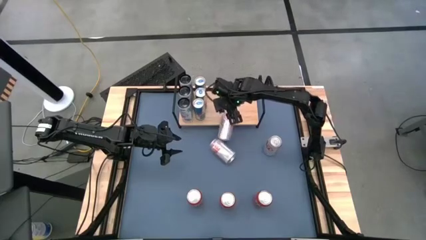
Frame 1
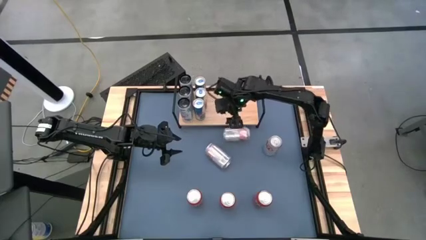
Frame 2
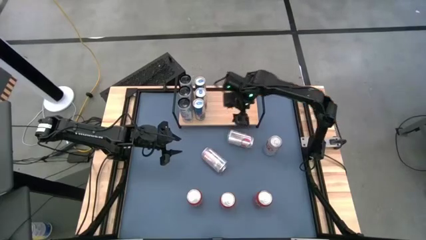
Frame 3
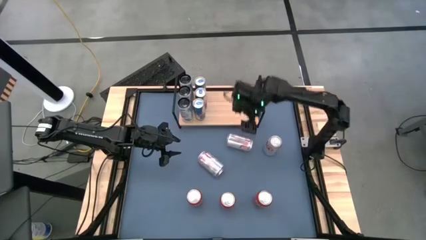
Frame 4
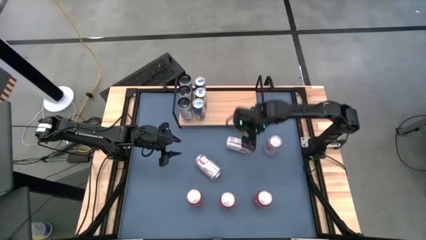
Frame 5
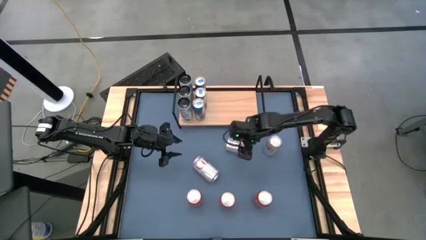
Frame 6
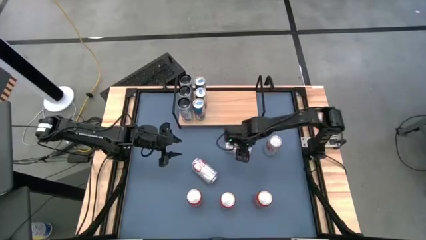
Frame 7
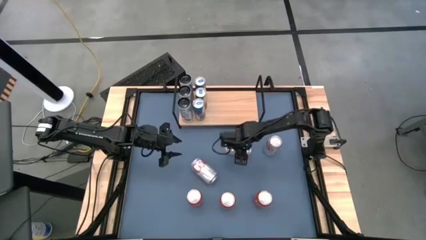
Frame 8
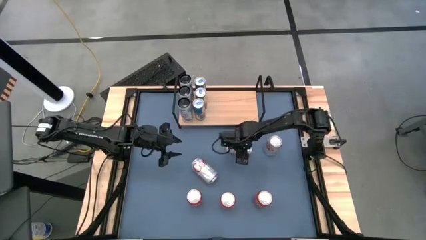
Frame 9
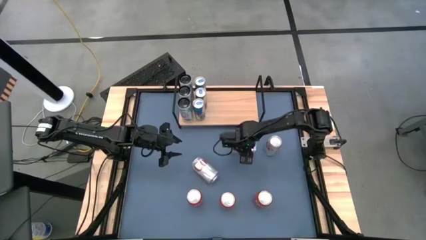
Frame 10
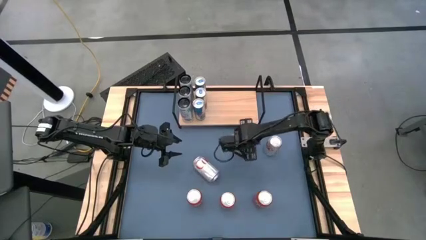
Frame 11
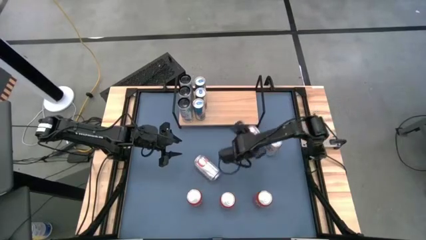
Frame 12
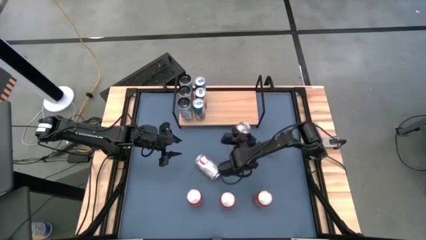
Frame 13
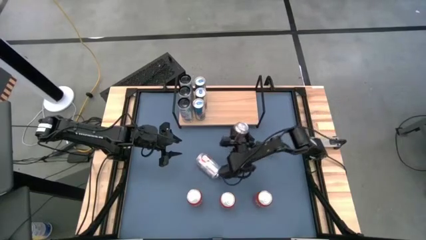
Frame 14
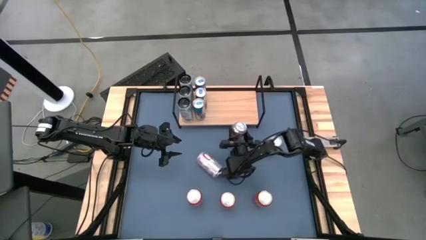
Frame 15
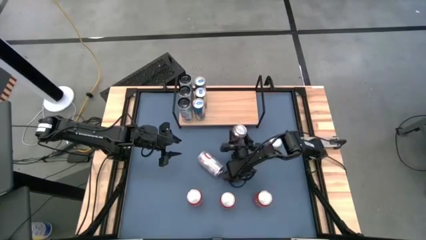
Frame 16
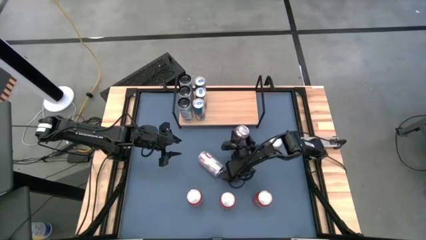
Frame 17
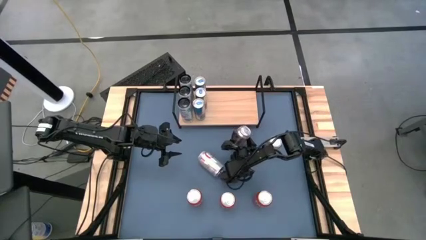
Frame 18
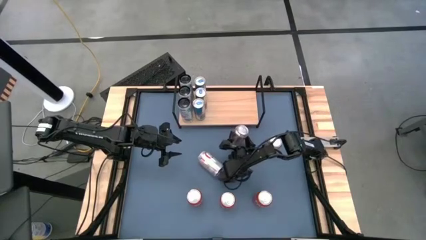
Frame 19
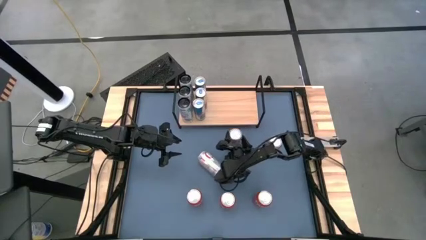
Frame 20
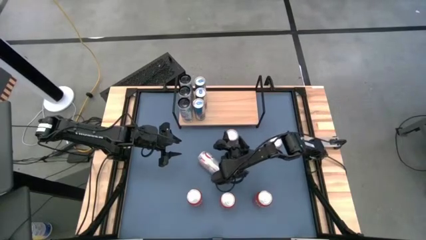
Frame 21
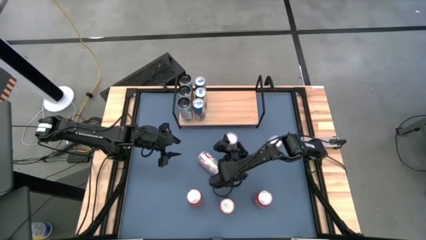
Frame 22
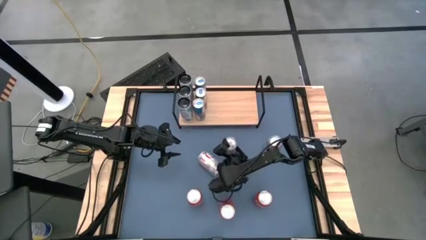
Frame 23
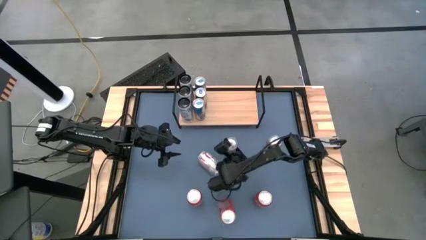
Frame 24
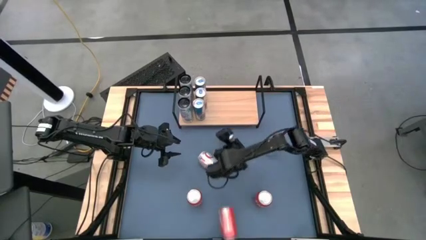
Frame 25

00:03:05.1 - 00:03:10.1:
Task: Place canned beverage on shelf
Adjust the middle silver and bottom red soda can

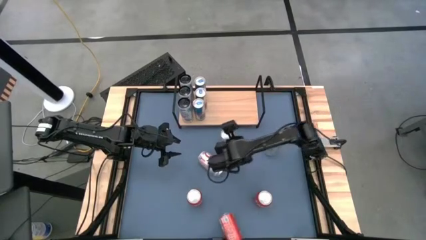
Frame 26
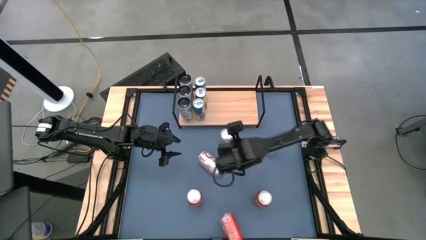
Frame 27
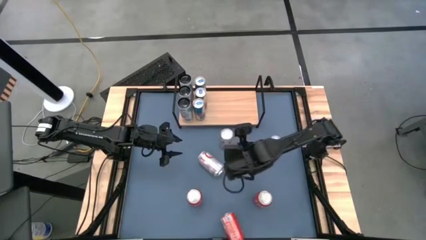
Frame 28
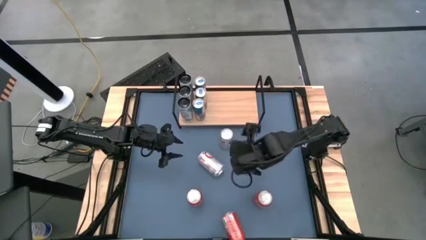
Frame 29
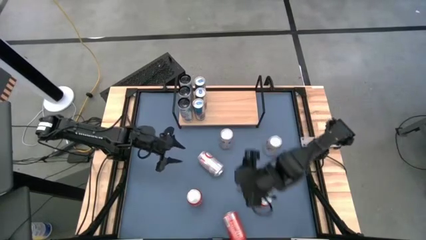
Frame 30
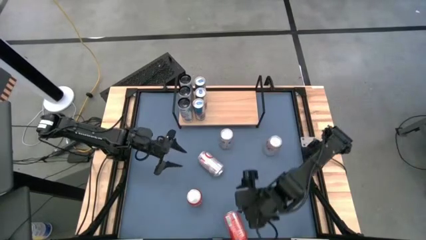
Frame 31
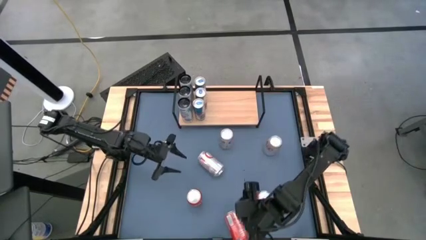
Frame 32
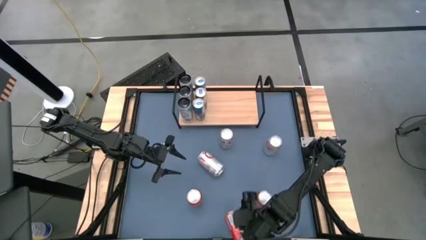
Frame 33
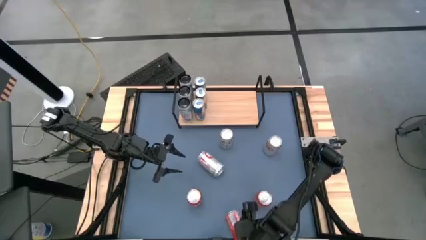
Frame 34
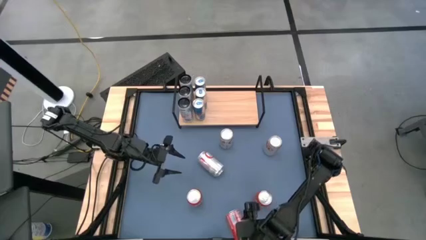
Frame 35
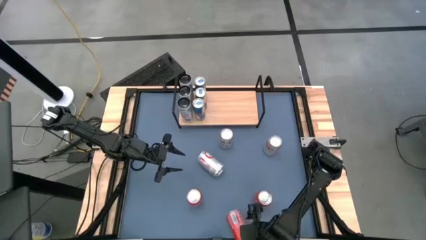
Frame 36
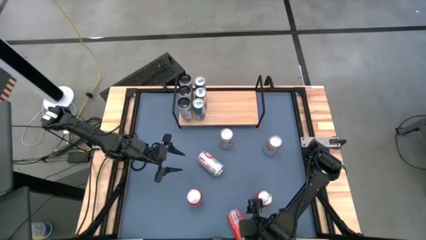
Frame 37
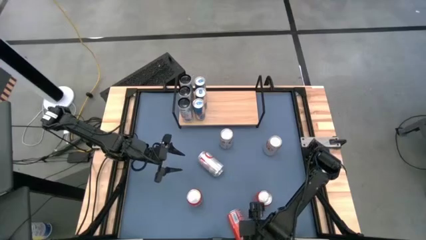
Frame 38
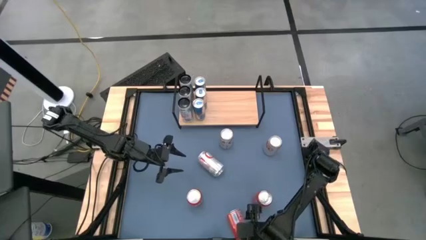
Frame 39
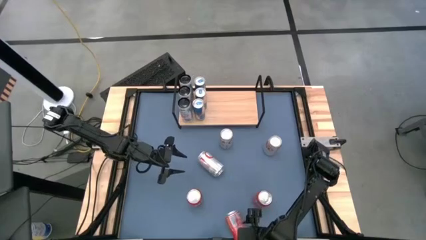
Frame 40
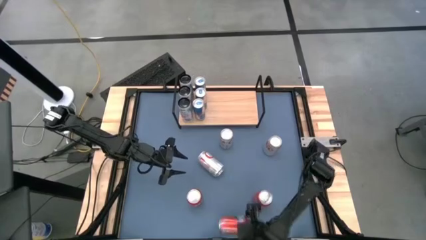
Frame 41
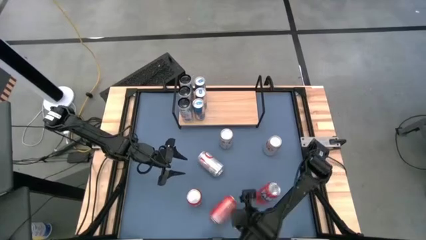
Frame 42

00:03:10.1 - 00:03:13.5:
Adjust the bottom red soda can

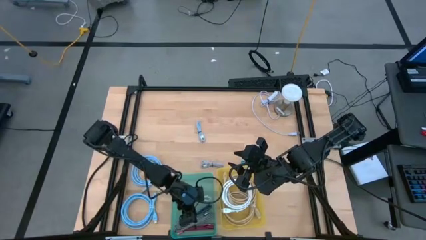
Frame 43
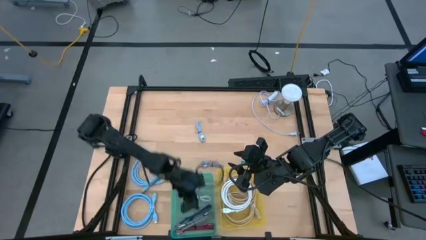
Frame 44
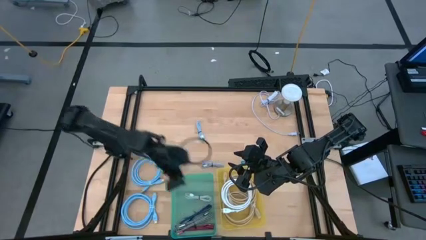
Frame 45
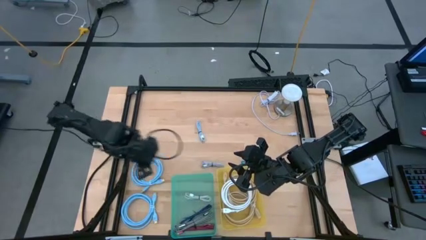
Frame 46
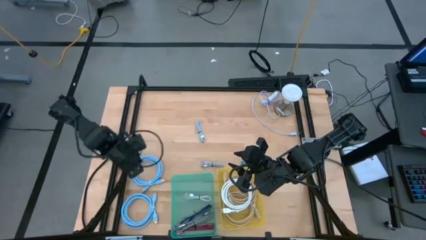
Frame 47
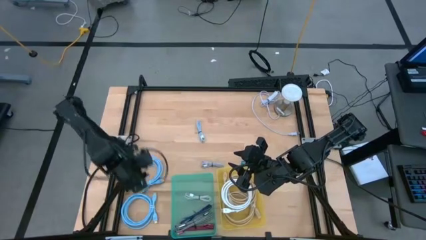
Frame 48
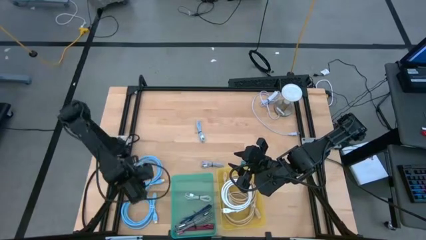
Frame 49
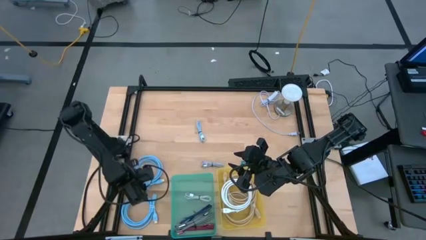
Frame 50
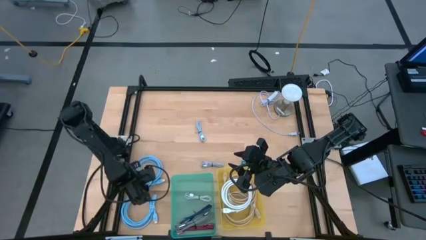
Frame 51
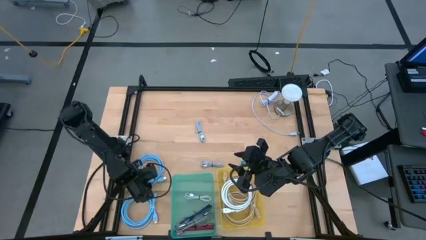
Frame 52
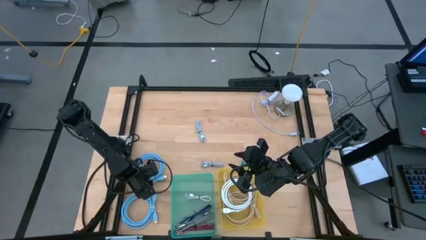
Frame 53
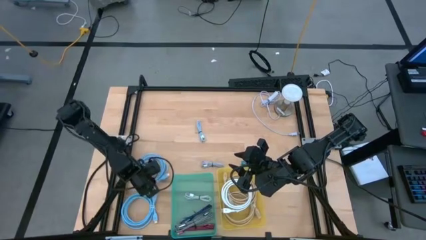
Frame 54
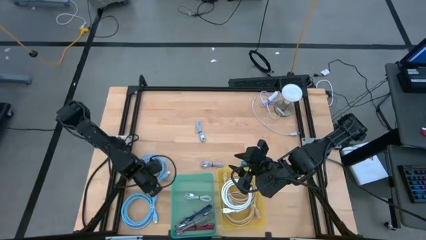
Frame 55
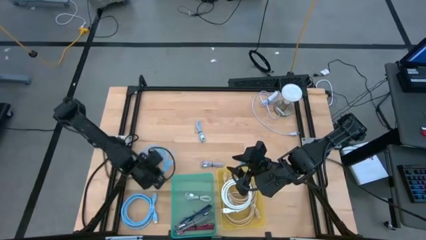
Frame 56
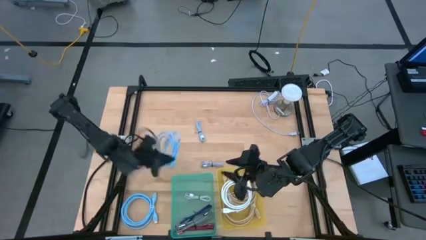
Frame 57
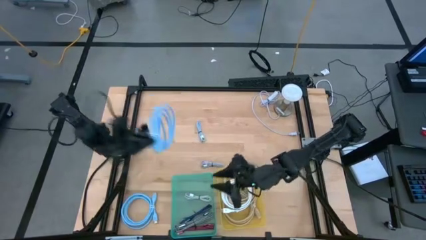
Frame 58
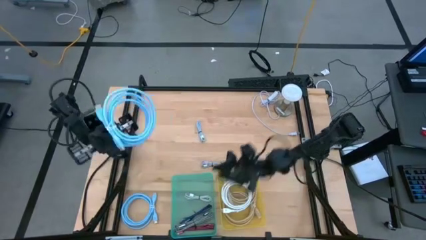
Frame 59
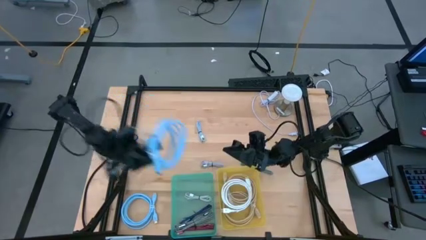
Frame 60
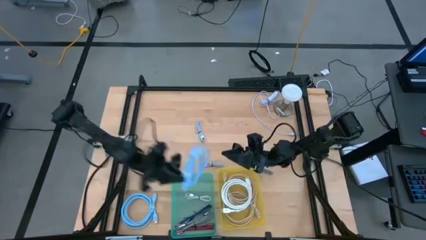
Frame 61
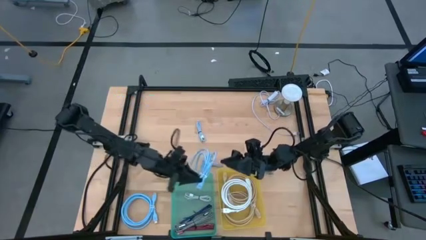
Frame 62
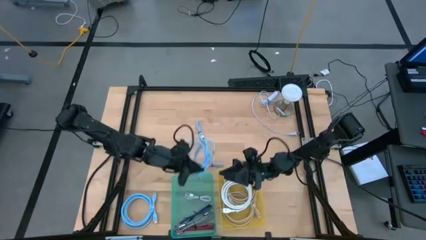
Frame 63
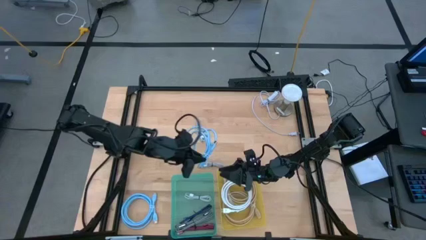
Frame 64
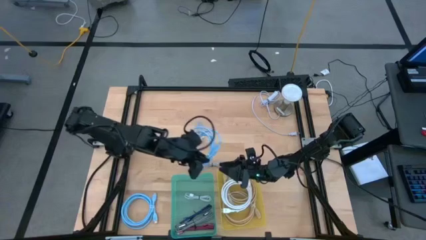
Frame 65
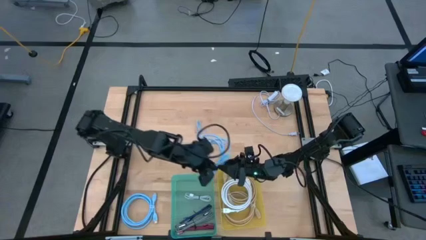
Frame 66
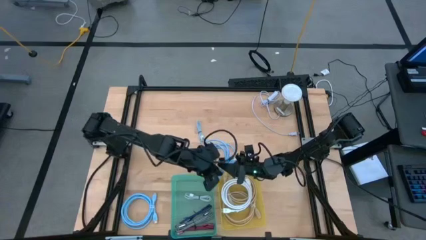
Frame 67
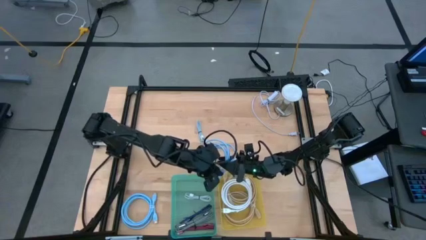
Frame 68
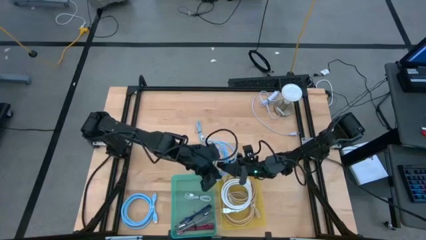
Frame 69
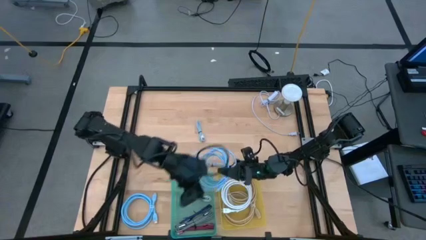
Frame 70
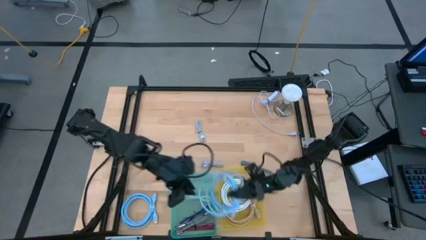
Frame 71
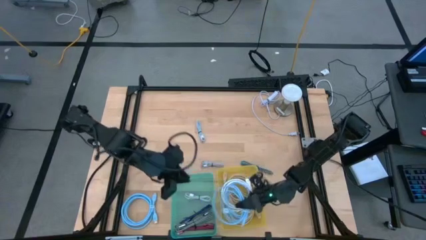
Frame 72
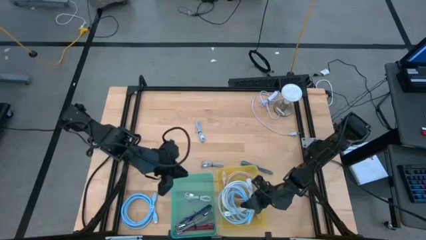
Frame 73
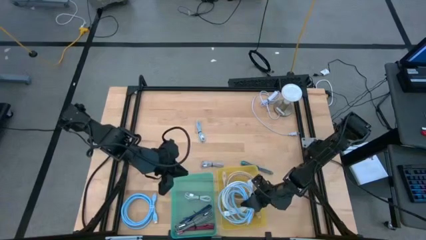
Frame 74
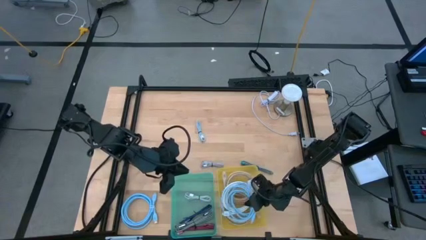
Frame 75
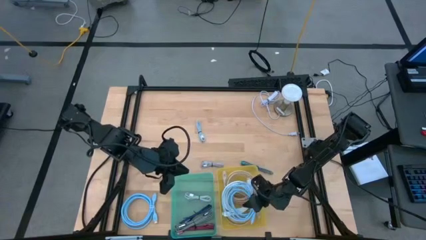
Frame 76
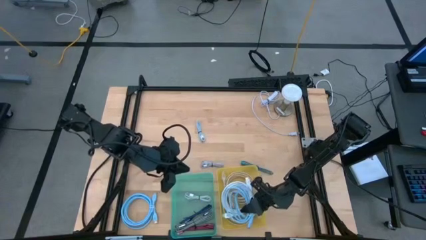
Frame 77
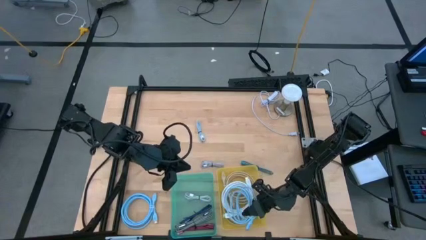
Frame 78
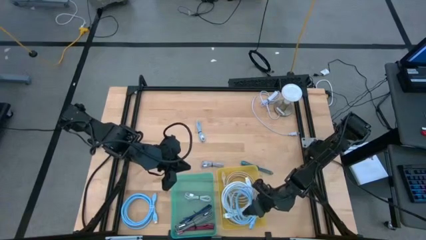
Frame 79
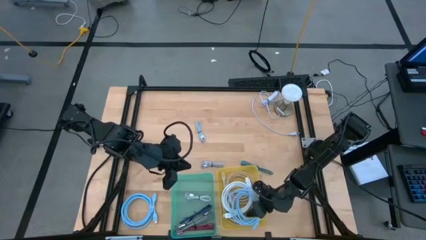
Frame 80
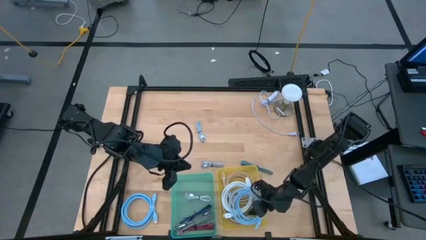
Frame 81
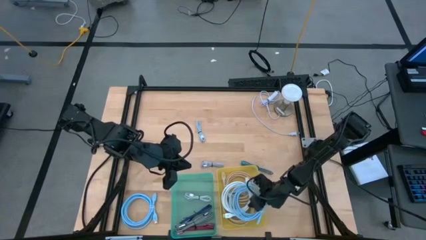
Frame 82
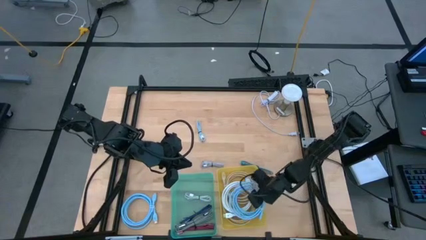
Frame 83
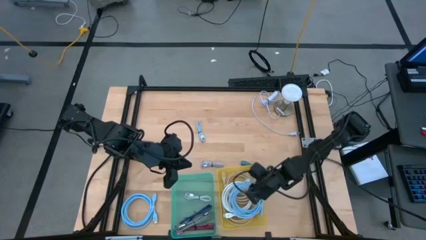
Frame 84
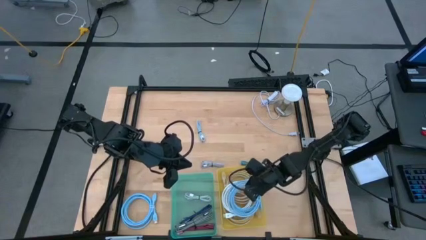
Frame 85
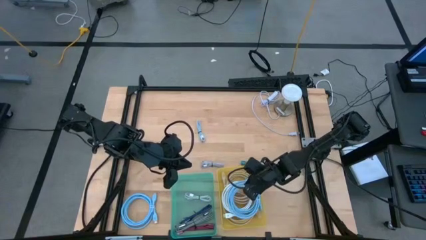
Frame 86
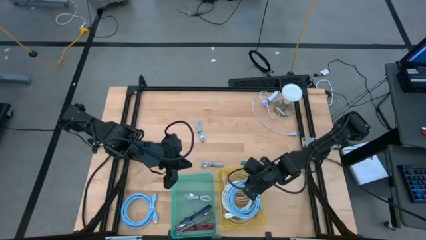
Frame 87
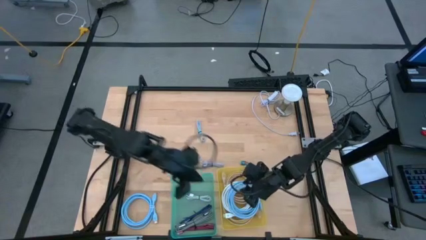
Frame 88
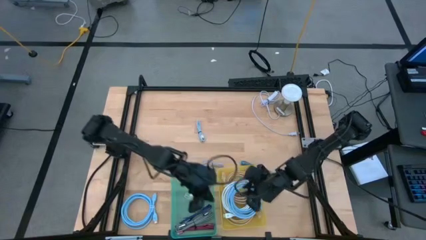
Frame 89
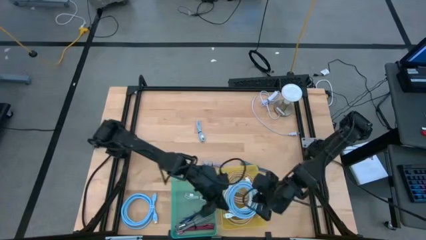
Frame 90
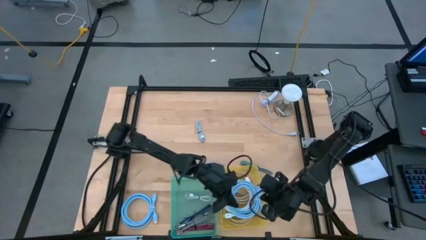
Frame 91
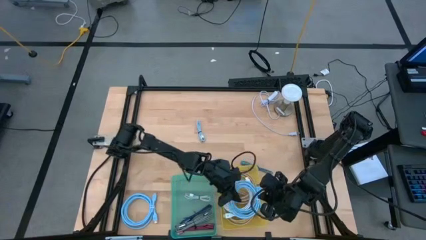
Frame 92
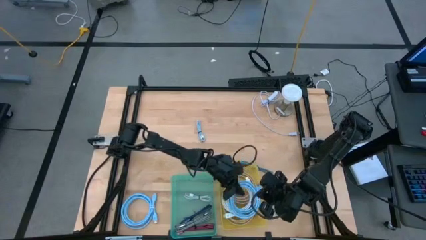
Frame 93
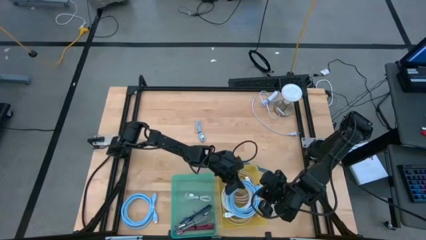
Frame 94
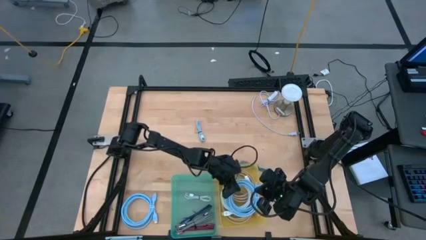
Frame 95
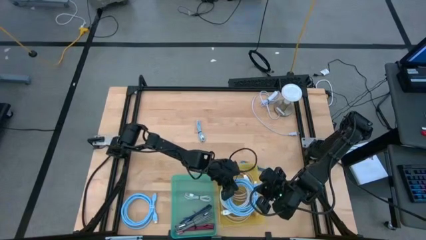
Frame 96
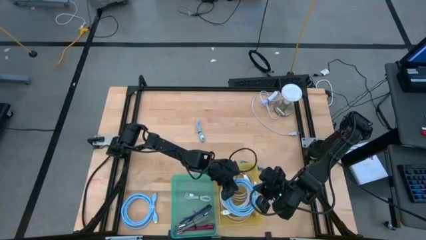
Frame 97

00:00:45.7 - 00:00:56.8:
Task: Pick & Place USB Port
Put the top blue HDMI cable into the yellow bin
